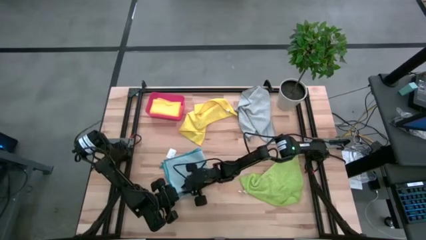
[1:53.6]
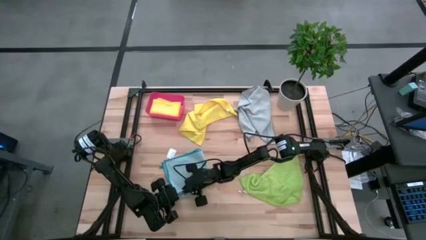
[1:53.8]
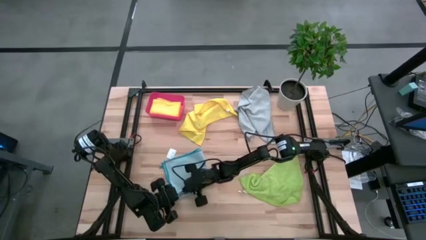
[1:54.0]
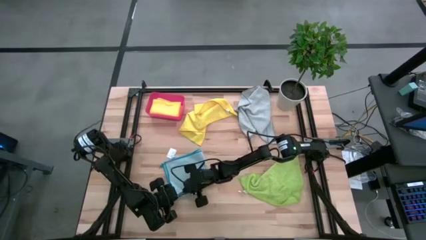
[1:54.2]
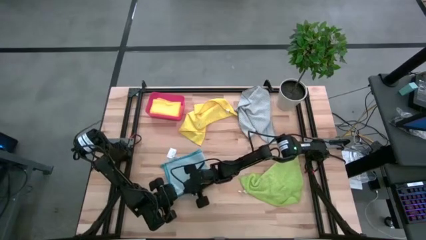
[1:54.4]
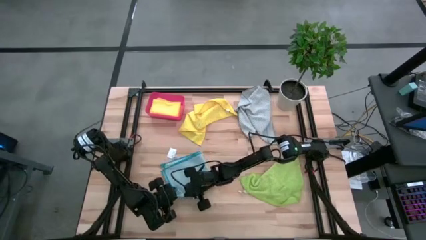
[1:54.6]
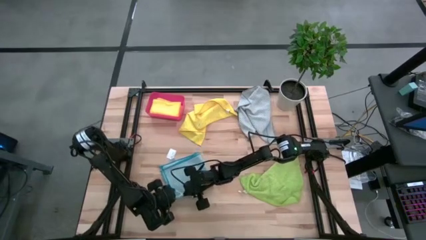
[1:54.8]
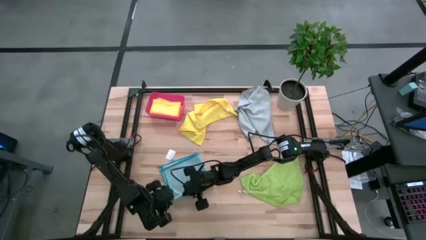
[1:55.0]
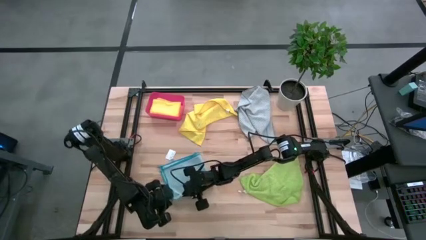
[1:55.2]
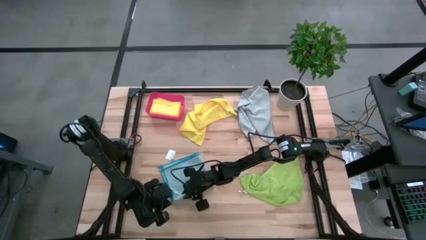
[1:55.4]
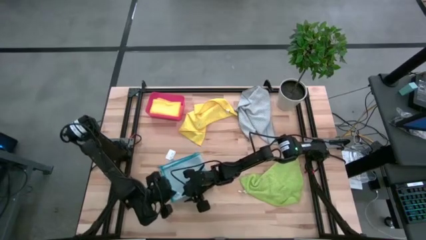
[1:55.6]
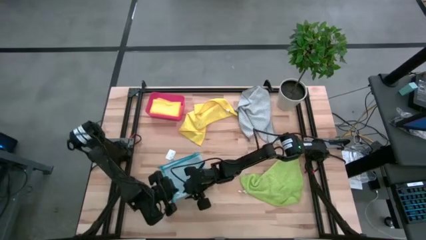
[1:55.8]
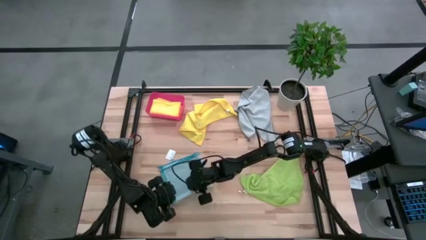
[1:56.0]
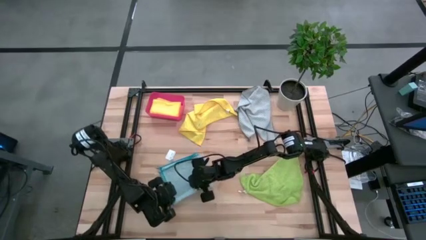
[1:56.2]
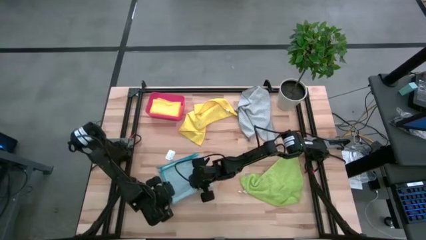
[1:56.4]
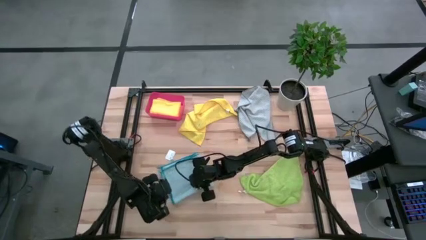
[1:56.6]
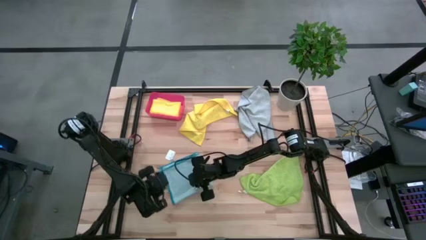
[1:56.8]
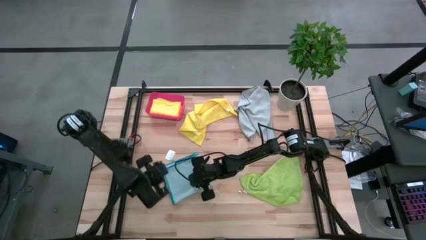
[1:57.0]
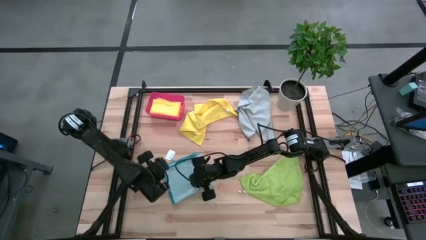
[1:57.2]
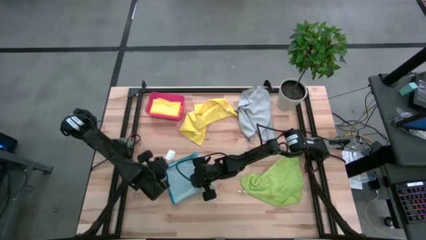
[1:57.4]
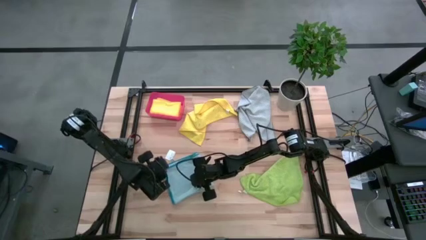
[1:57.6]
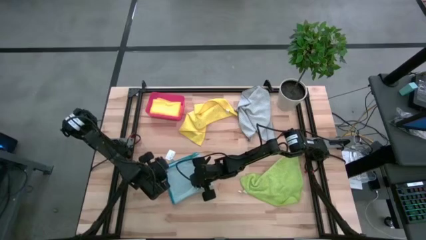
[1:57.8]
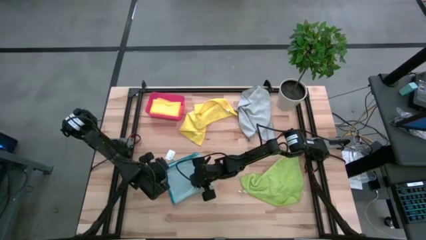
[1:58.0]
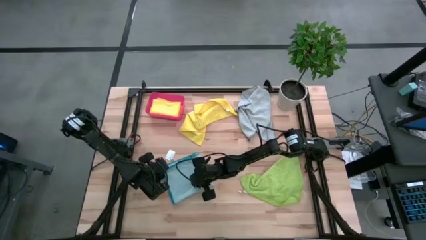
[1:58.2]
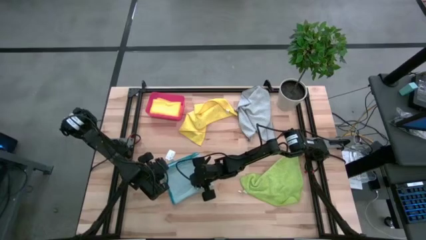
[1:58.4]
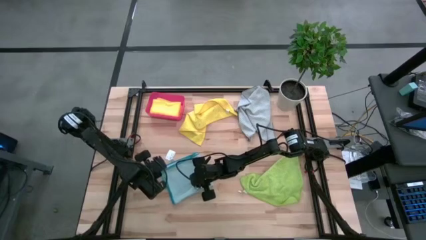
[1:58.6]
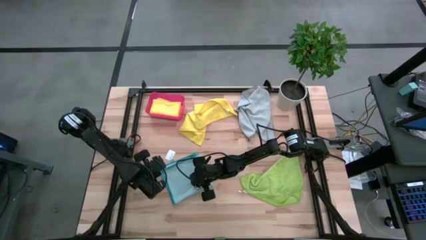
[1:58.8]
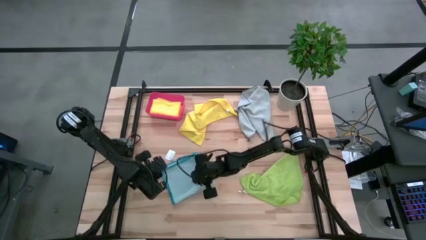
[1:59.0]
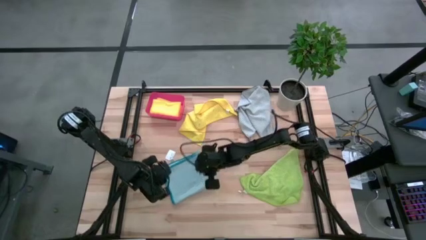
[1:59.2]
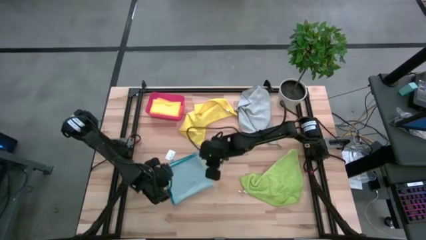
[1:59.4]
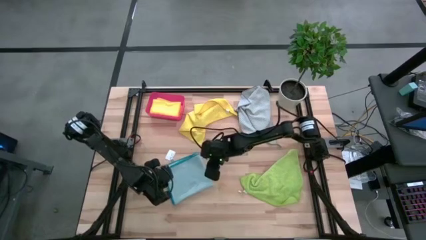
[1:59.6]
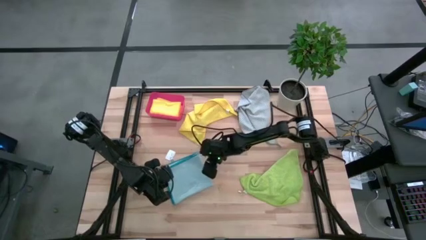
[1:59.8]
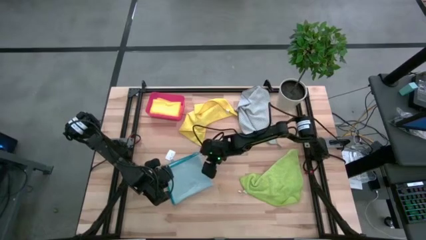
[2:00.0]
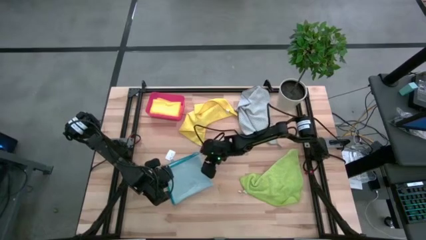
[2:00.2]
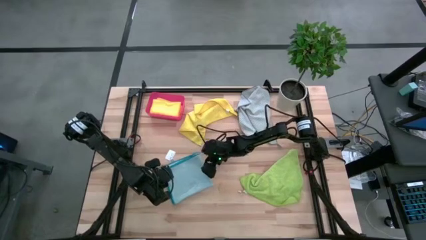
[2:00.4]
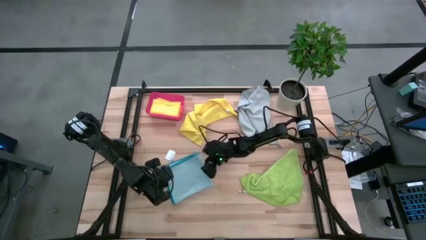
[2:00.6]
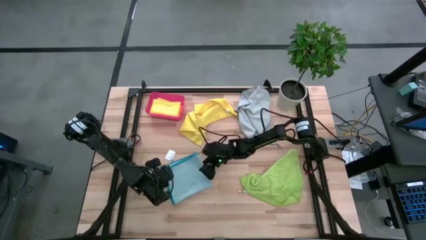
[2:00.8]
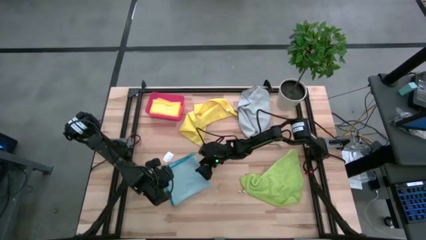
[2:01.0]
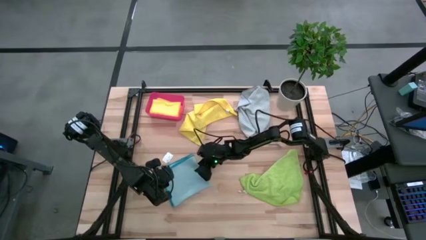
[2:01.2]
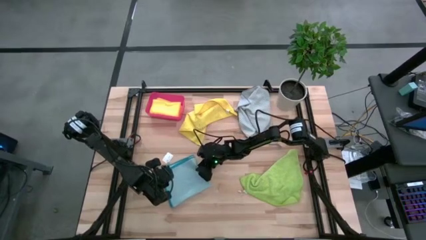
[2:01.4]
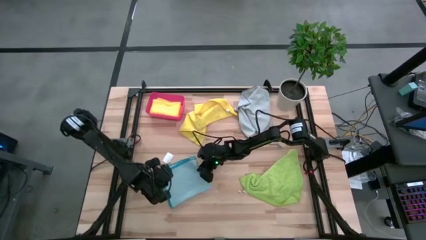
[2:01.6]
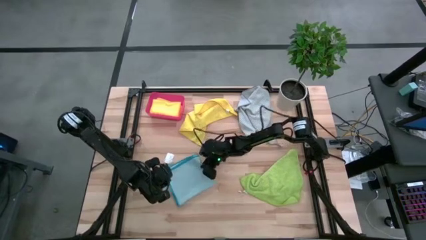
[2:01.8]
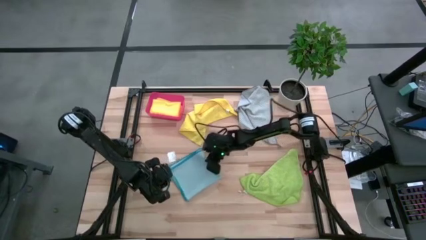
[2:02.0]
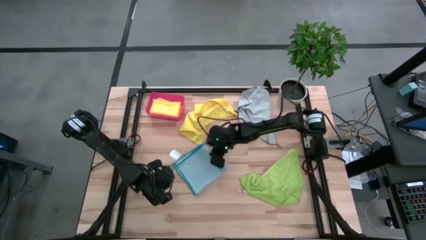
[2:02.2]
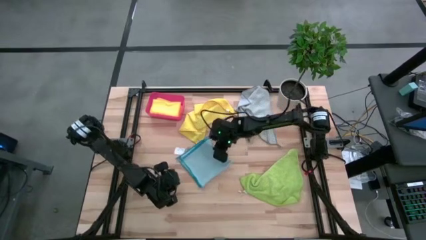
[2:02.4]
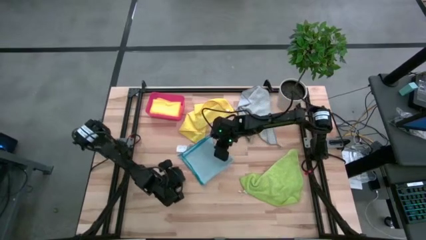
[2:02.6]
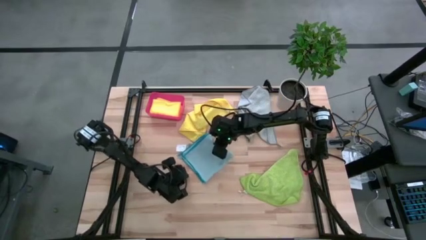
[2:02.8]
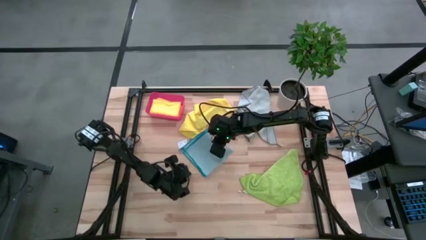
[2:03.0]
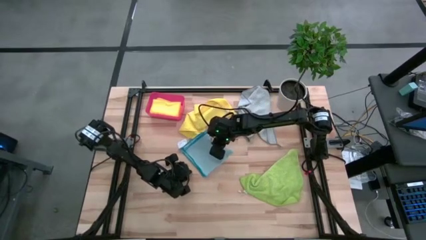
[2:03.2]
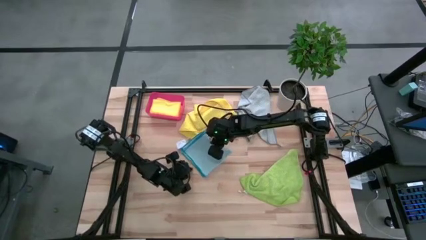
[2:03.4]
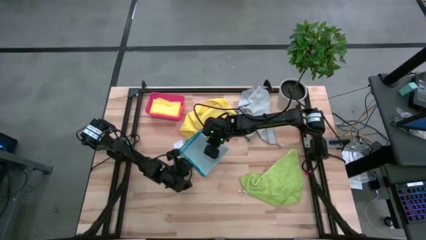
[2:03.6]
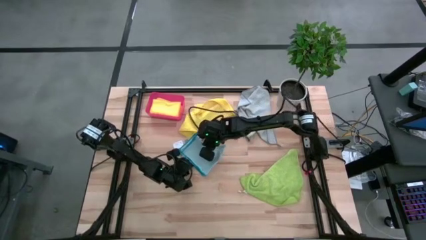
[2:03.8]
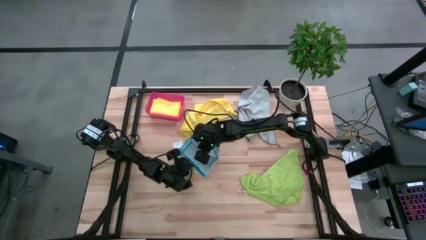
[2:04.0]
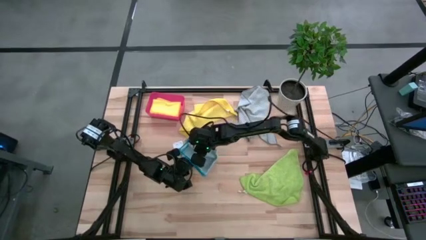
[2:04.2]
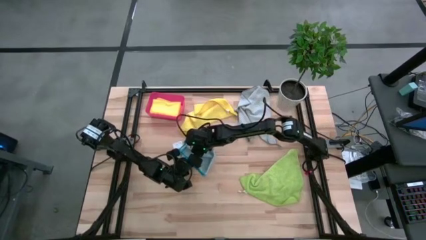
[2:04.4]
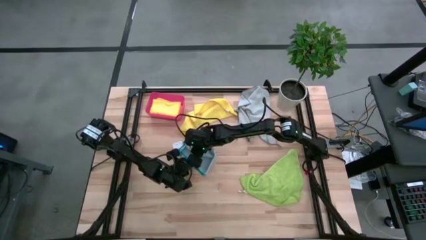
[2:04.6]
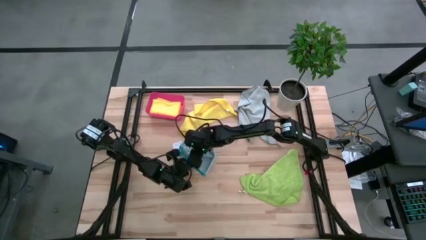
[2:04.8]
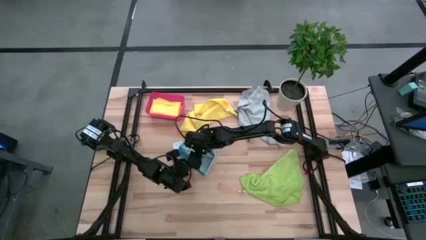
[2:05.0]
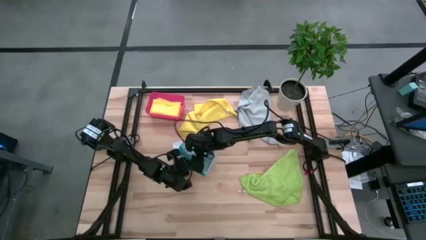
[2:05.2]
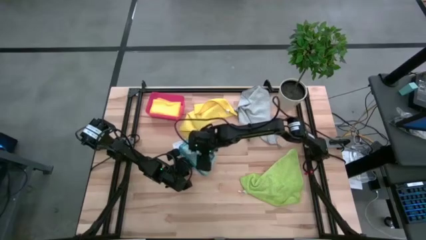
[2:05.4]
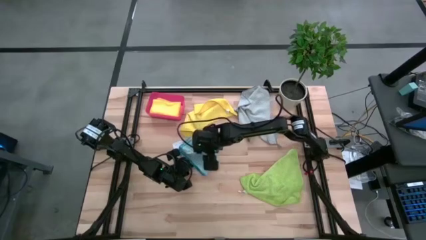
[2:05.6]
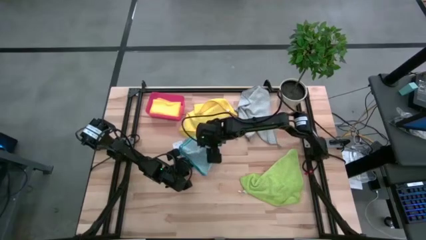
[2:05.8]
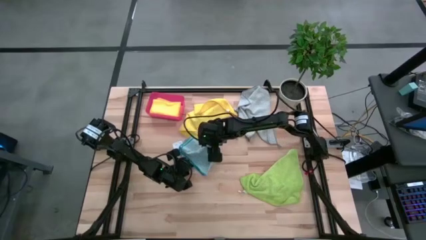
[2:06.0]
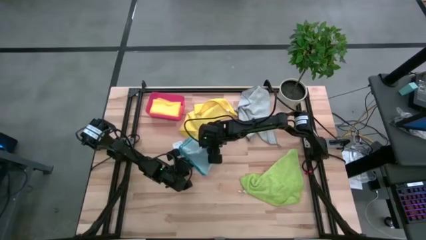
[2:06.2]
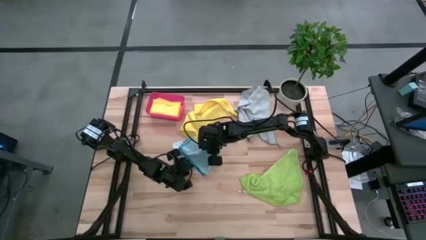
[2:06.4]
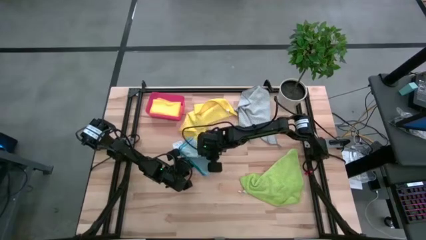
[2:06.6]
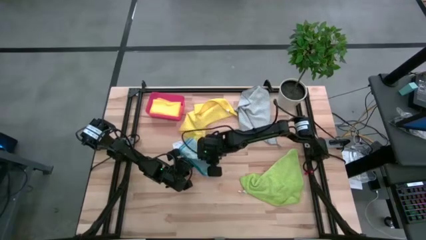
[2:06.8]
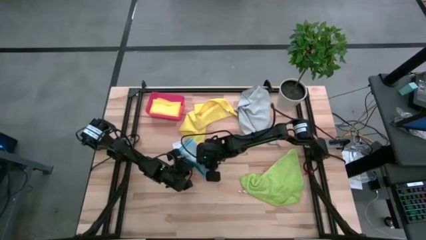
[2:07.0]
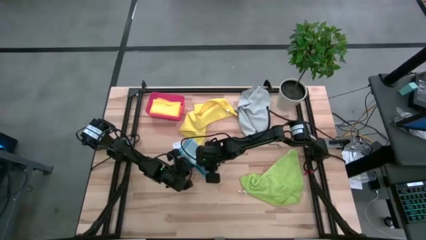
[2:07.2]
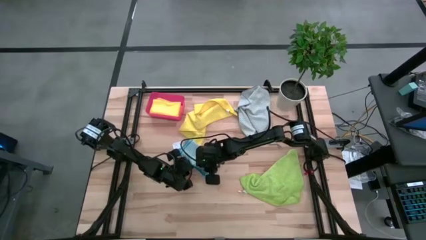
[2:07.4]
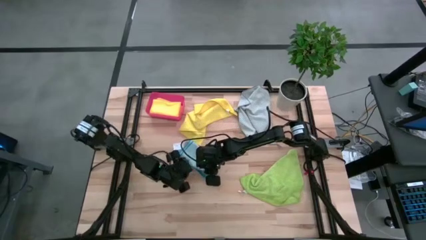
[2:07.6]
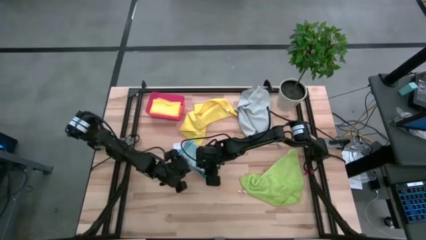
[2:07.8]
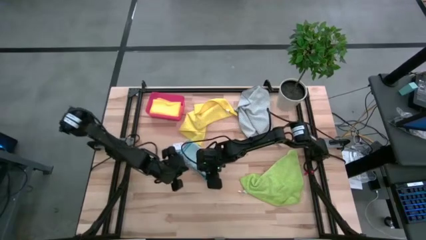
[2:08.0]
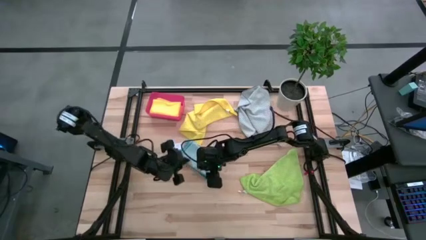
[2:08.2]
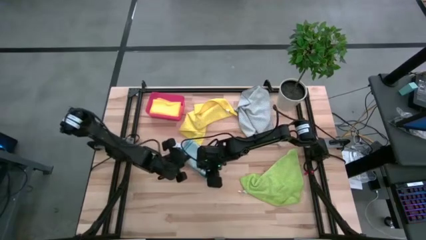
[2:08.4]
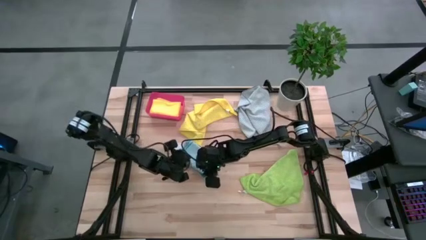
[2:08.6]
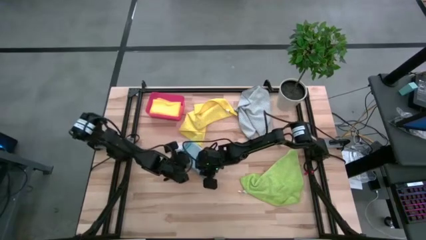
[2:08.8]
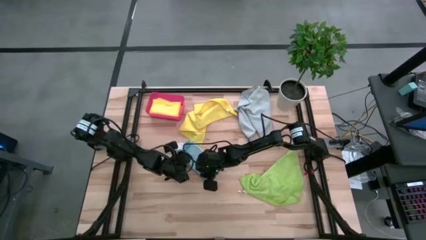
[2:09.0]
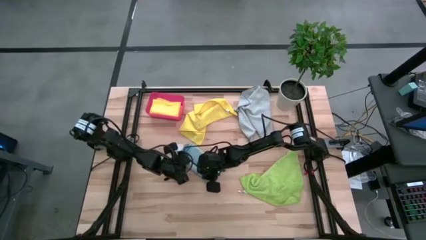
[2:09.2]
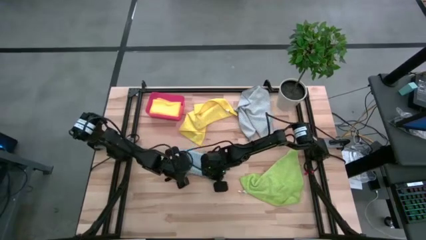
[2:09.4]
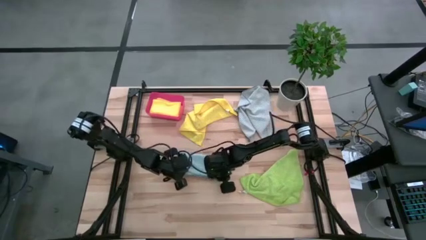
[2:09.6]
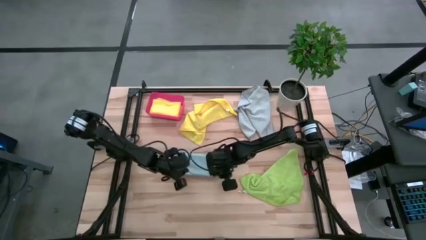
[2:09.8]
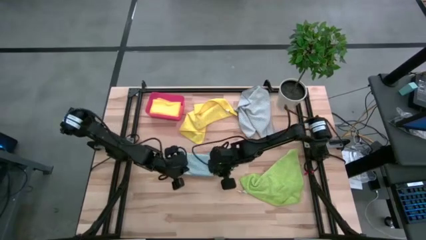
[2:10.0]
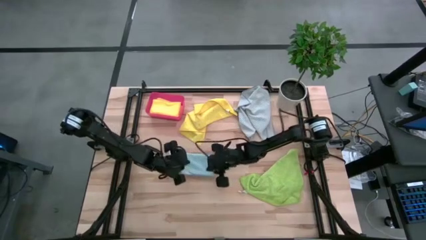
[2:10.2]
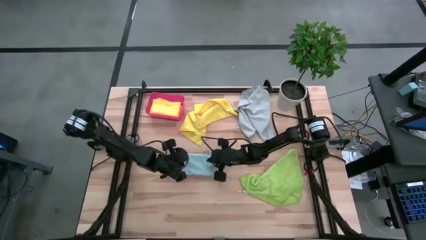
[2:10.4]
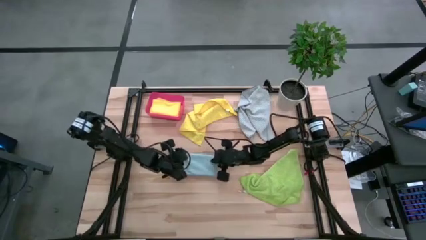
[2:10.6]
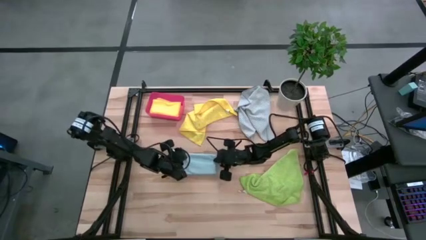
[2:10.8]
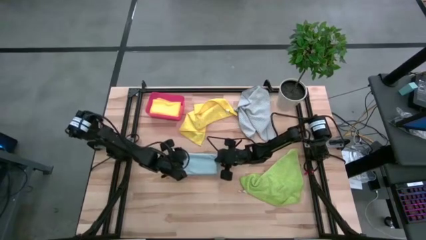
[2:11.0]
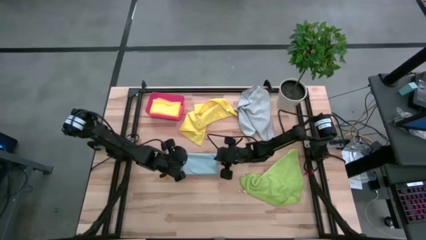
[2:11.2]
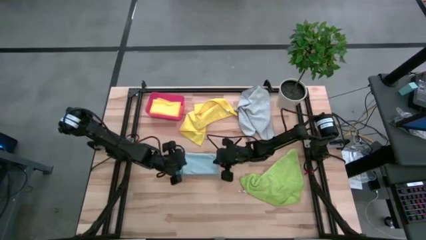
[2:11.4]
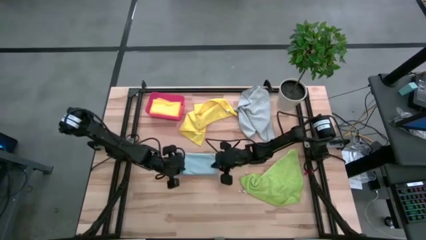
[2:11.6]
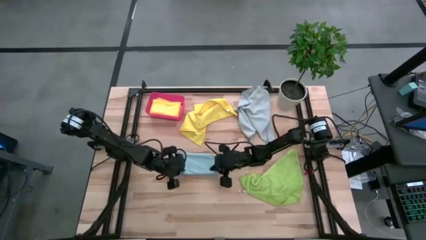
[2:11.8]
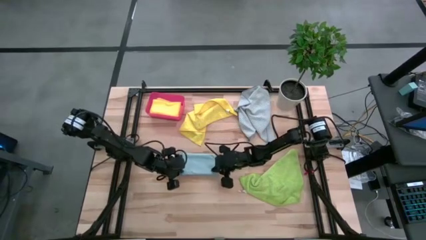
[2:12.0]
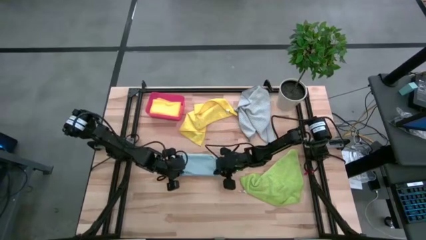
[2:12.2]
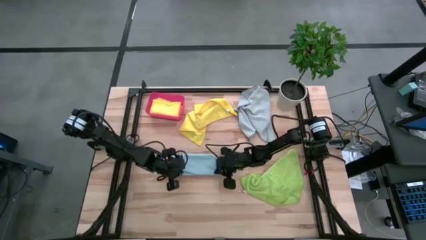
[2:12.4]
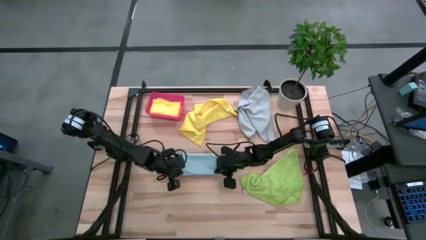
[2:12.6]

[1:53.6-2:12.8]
Task: Fold microfiber towels
Fold the light blue microfiber cloth
